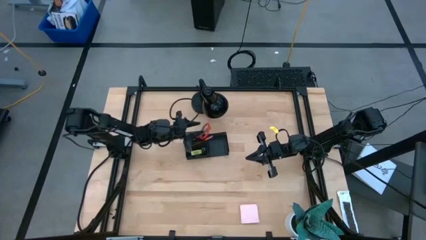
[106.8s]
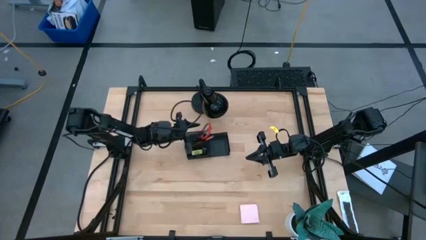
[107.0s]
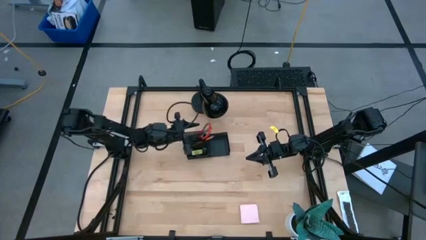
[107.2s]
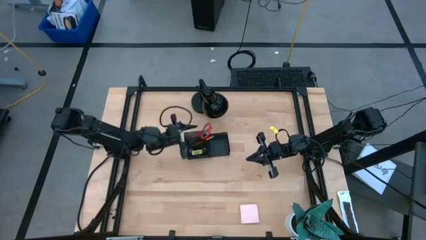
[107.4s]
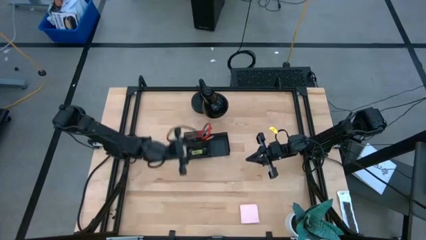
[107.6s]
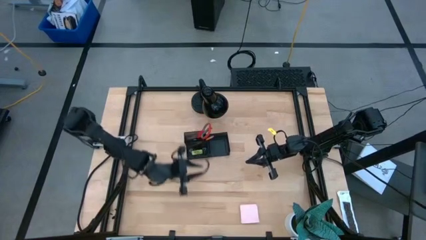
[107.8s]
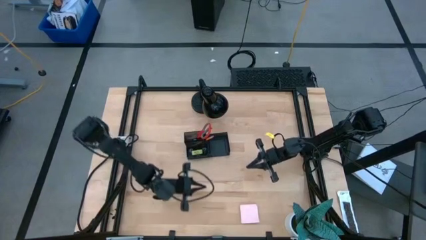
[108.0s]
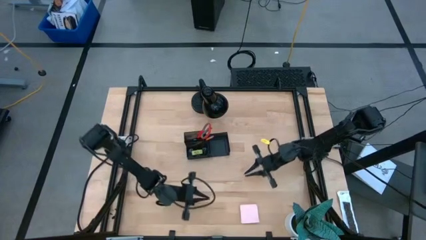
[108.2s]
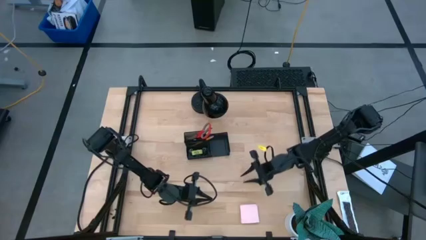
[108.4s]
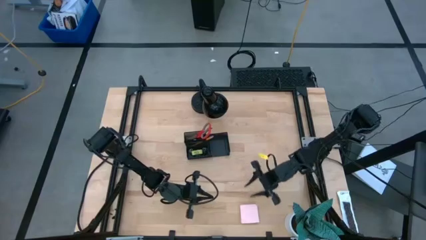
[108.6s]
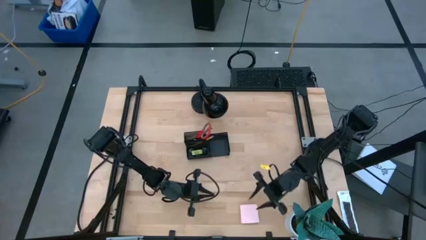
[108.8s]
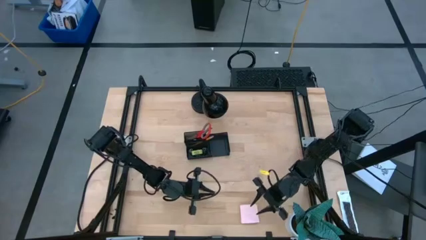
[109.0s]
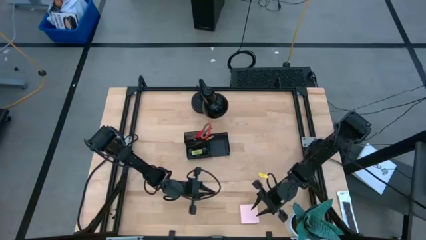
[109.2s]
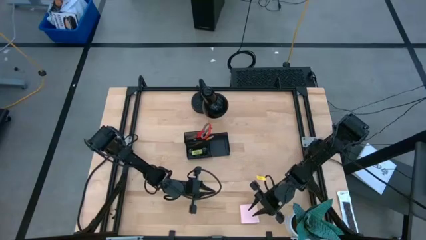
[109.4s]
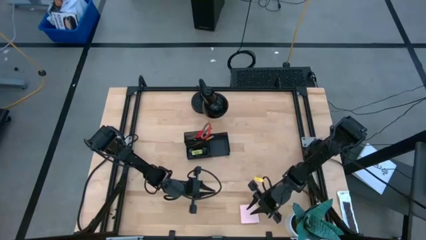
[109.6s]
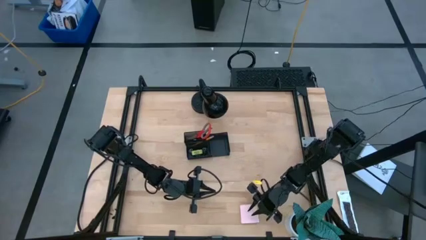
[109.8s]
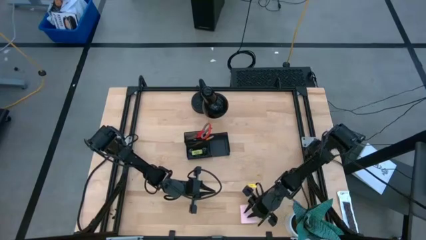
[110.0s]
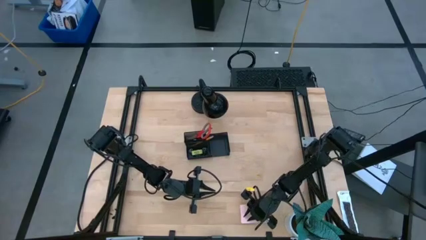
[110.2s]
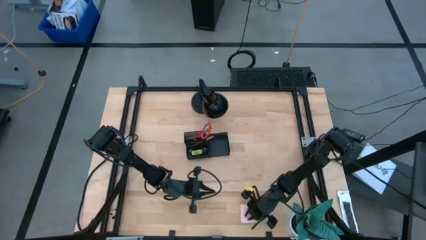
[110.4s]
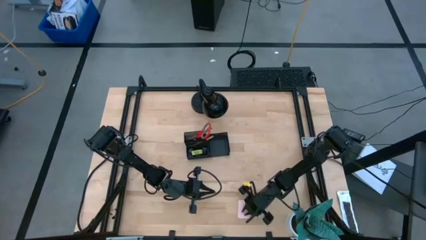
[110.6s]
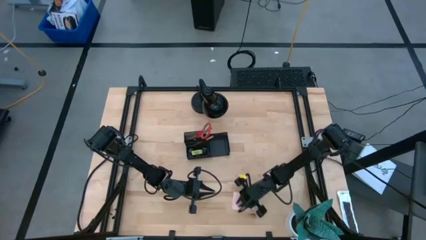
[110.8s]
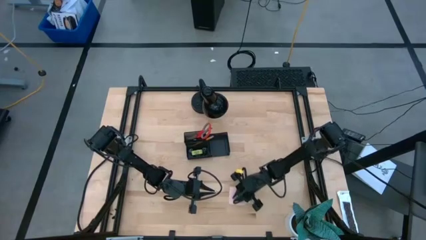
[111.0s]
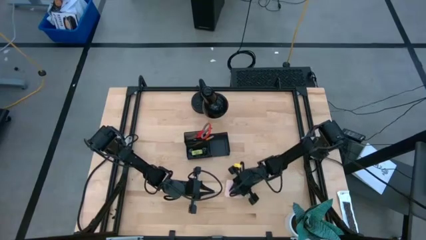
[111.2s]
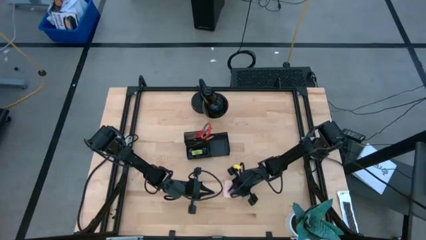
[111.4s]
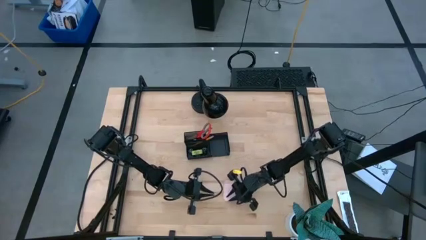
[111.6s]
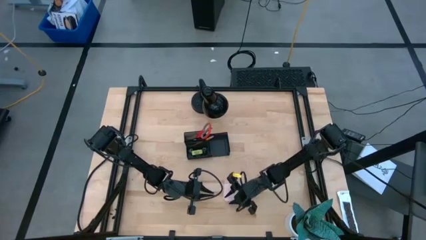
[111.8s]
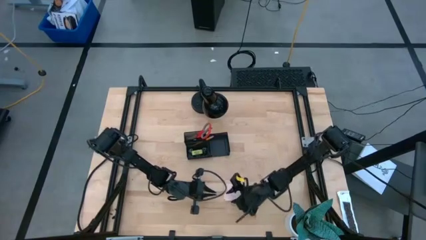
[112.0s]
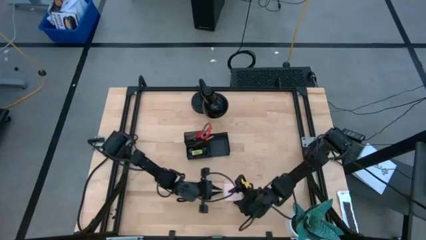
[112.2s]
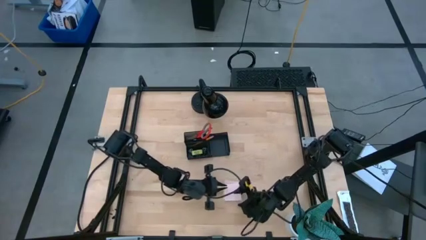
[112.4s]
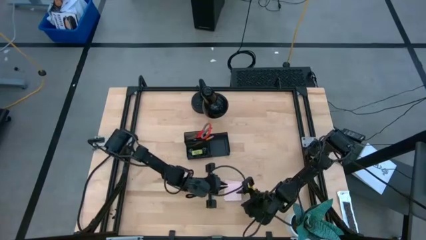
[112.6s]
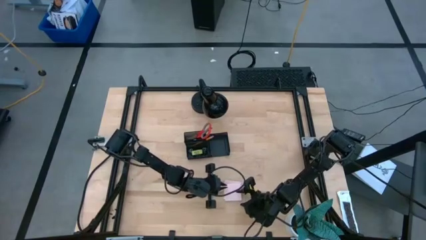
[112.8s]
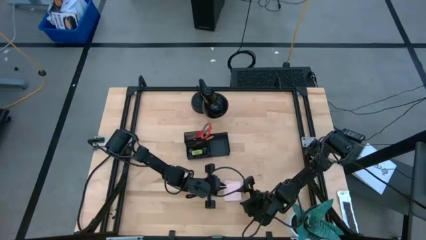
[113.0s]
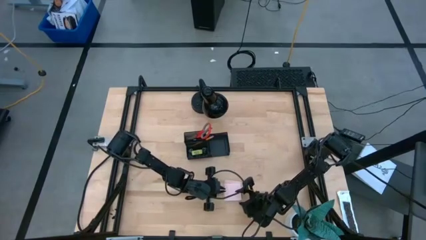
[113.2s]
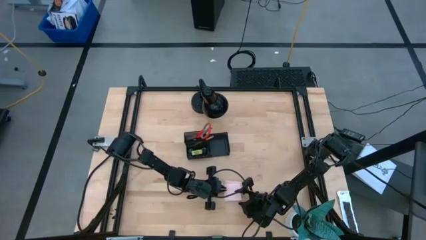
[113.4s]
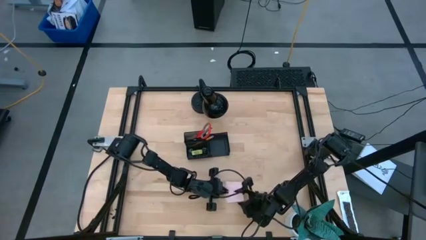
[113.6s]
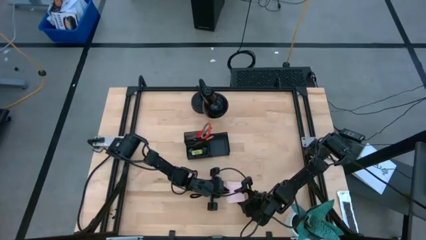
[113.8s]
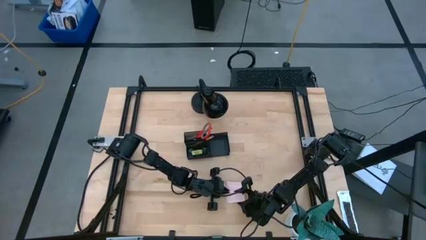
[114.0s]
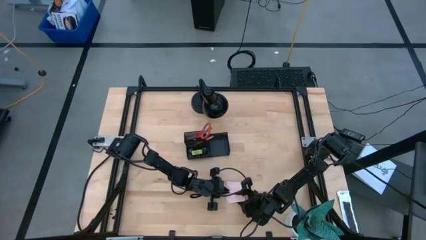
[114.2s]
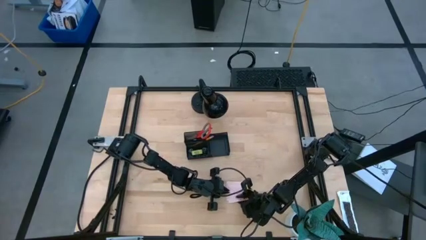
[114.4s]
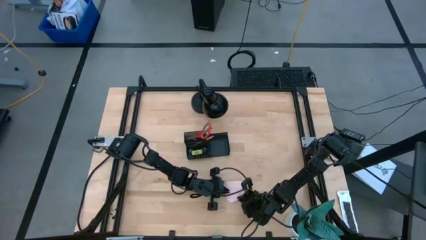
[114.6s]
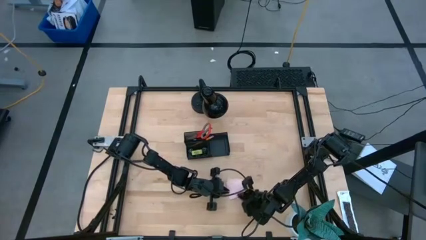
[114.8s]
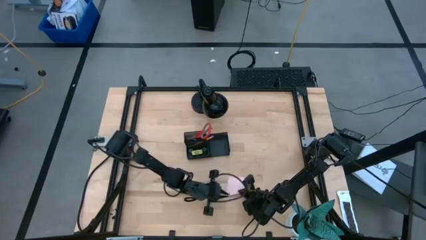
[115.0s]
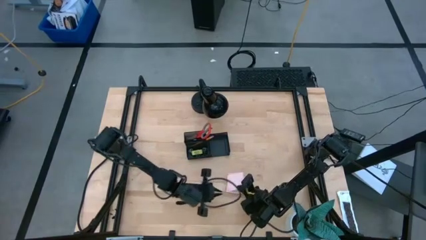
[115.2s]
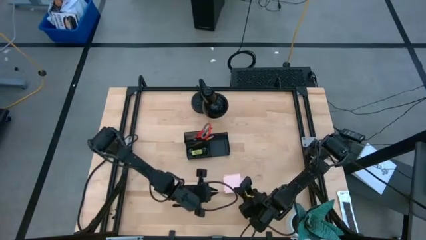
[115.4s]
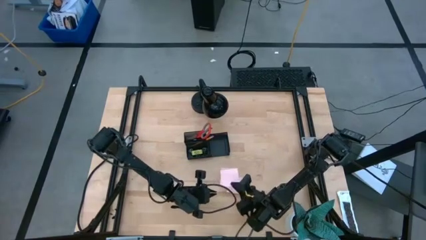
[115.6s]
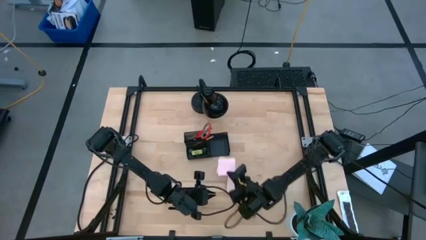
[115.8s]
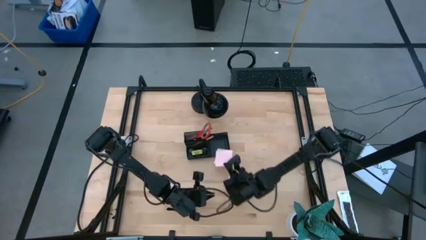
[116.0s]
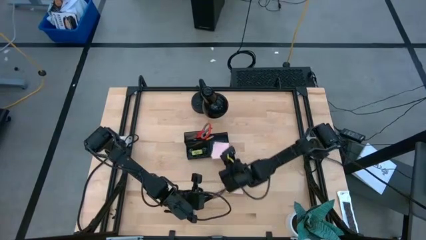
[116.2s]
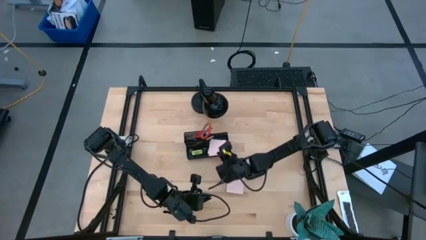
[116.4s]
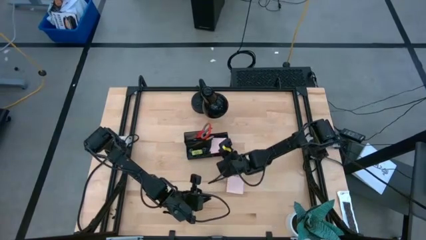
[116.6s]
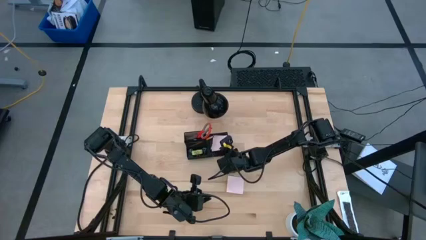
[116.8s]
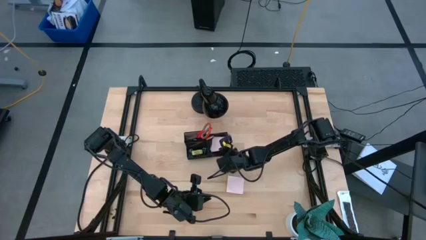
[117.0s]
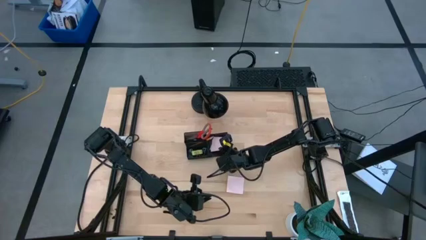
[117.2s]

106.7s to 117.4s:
Task: Pick and place office supplies into organizer
Put the pink sticky notes into the black desk organizer

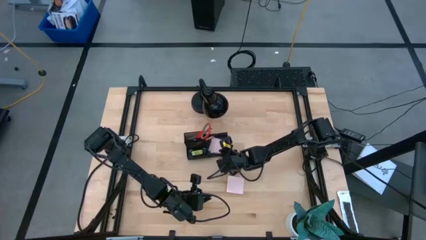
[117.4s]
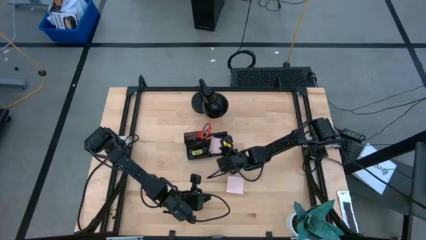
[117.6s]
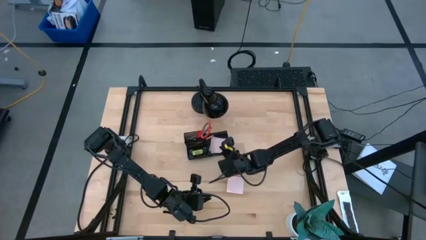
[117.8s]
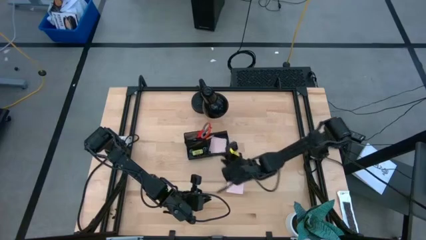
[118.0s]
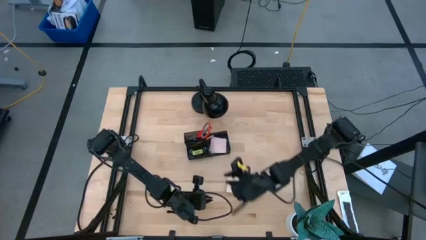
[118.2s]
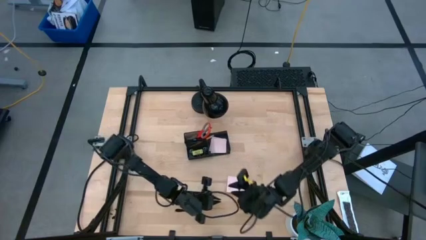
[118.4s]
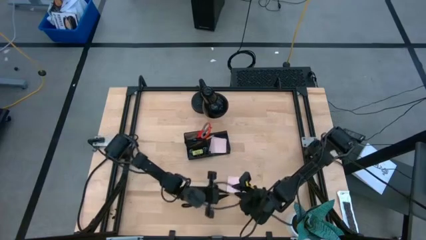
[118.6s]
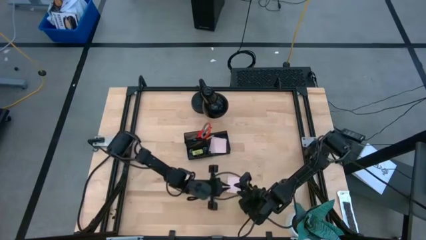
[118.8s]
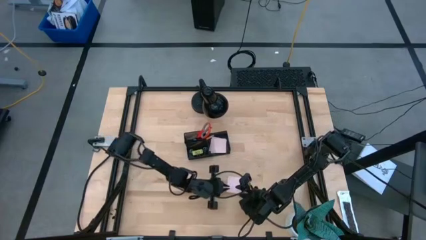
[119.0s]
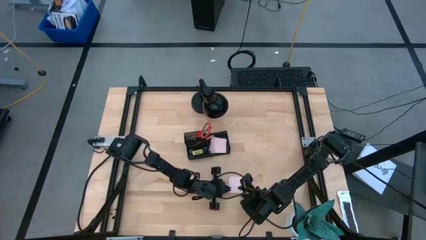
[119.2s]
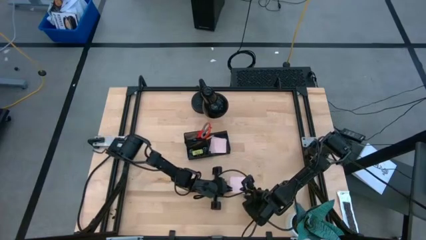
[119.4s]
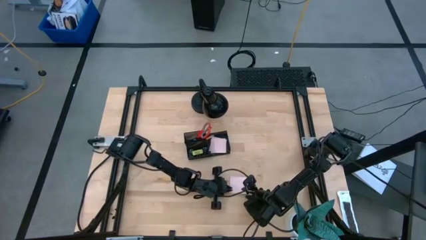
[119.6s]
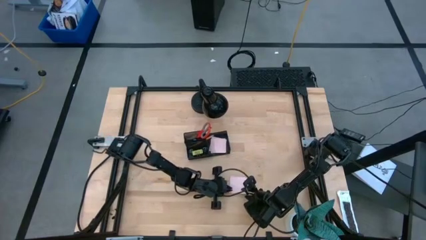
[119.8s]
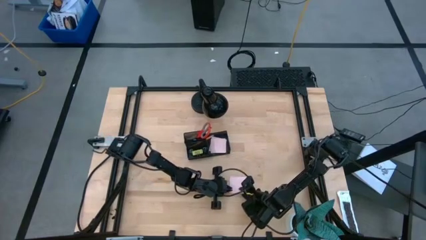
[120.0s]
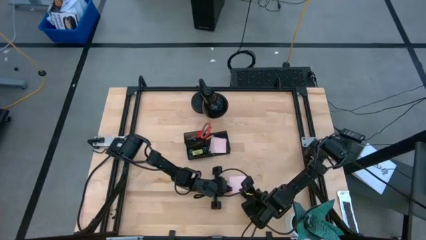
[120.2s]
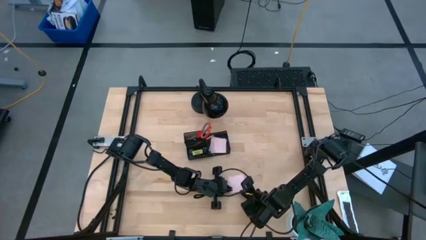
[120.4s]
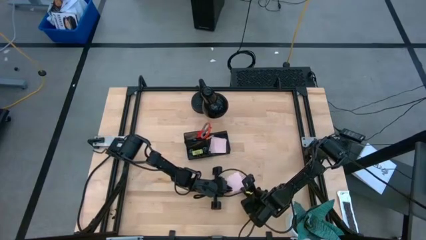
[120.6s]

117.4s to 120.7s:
Put the pink sticky notes into the black desk organizer

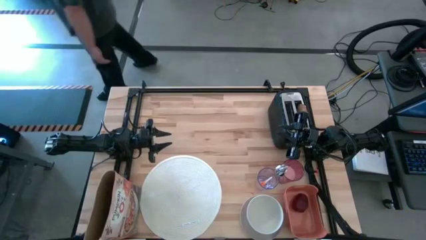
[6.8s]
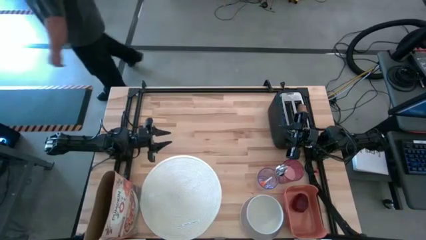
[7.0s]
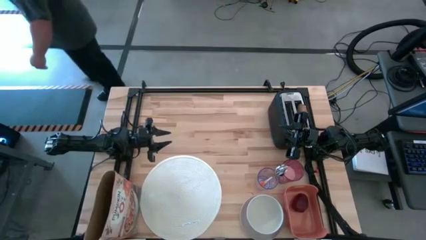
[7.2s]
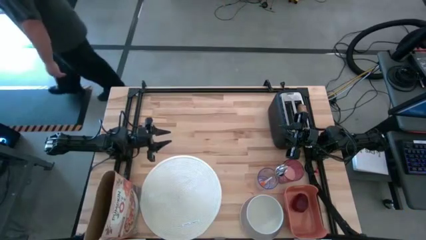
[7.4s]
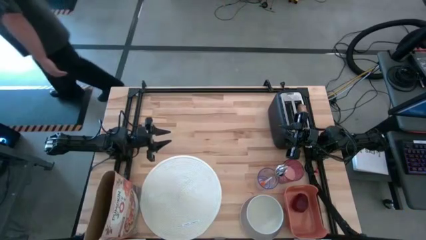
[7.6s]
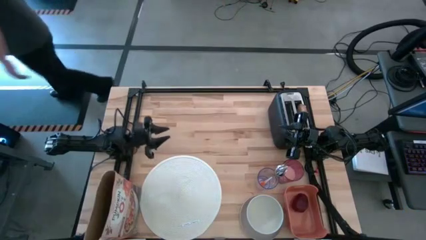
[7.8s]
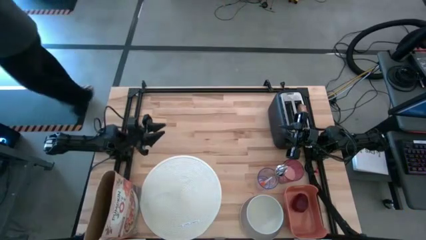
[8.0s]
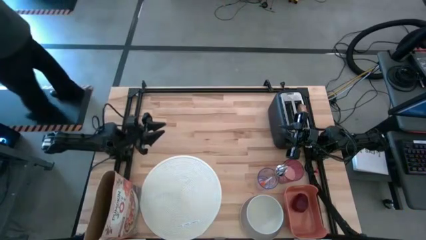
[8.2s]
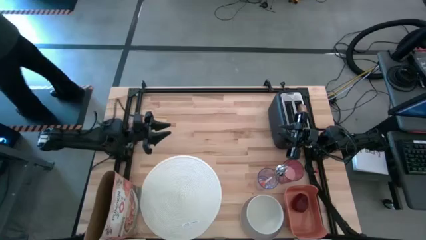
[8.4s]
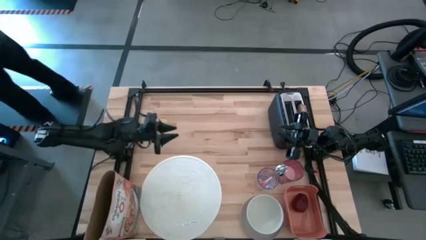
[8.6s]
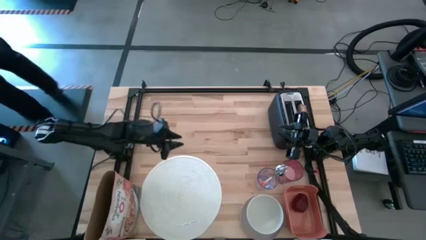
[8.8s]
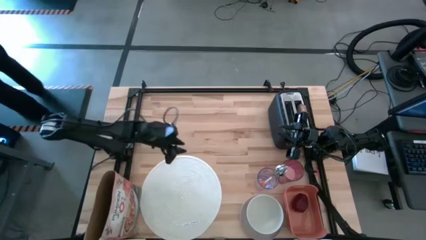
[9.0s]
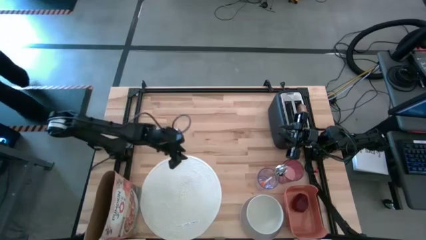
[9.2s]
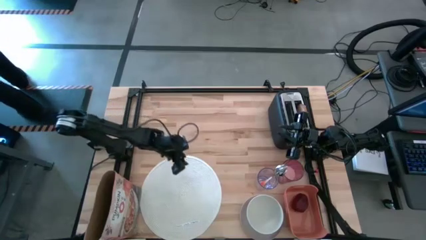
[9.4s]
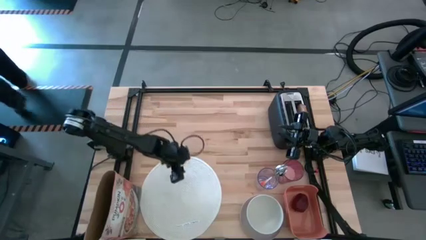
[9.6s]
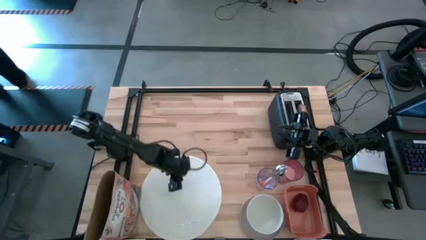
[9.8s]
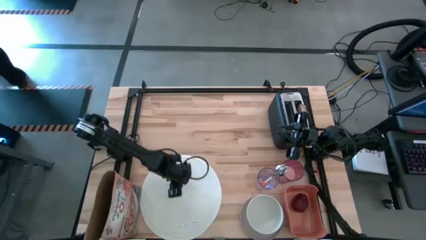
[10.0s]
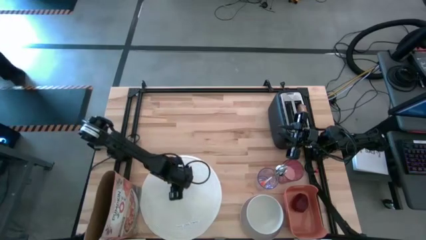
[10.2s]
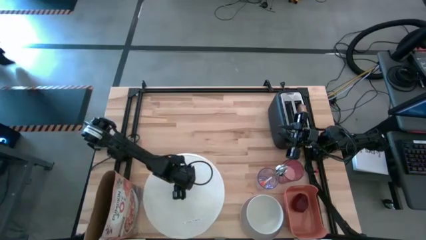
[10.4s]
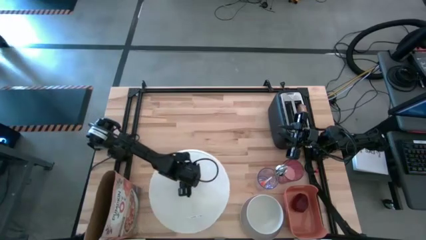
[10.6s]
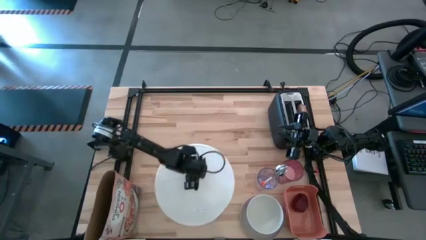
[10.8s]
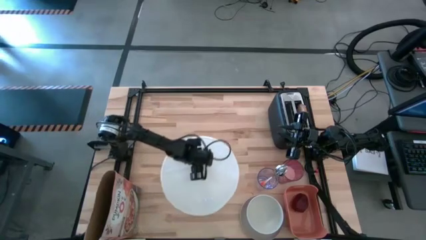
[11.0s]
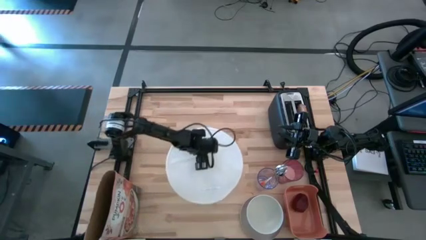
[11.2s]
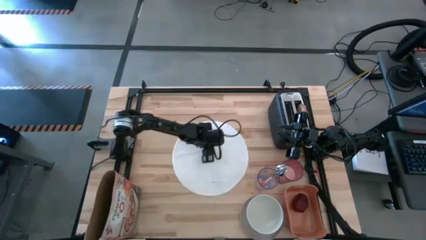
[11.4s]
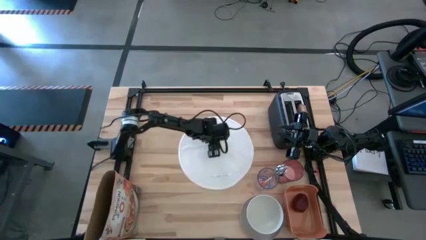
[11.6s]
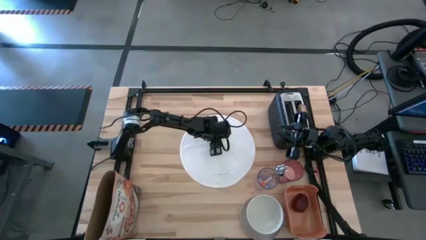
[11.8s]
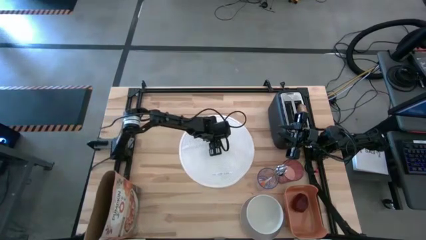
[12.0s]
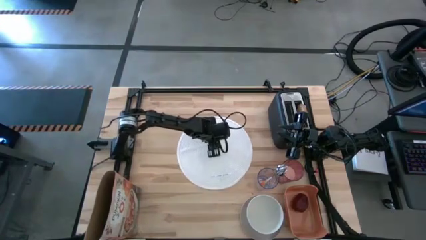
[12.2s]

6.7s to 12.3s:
Task: Arrange a breakfast setting
Move the white placemat to the center of the table
